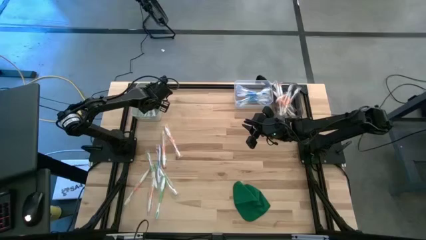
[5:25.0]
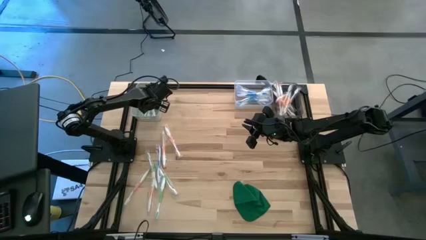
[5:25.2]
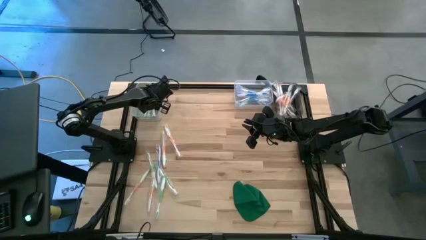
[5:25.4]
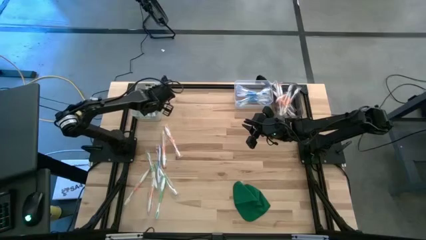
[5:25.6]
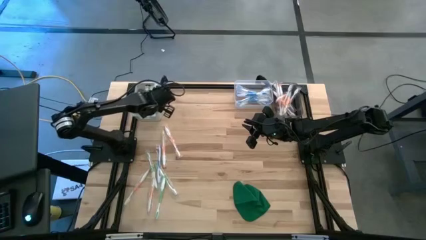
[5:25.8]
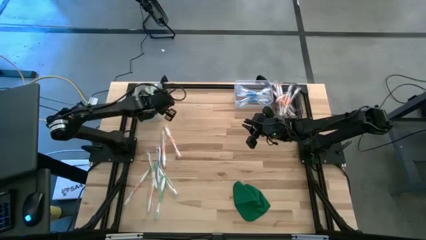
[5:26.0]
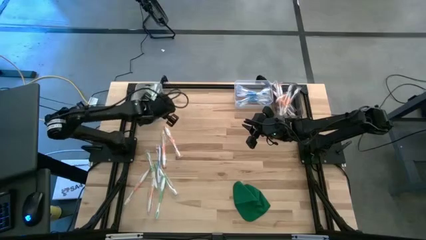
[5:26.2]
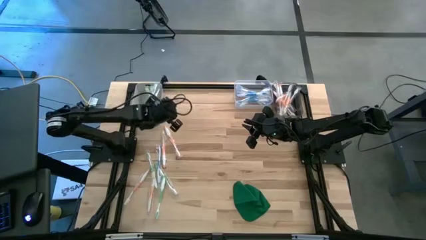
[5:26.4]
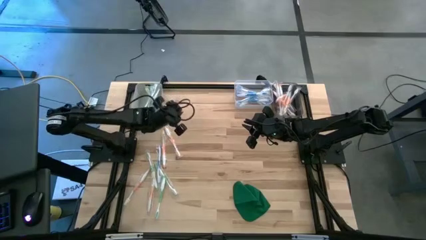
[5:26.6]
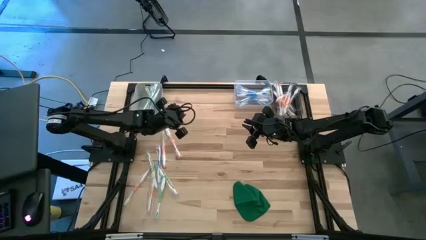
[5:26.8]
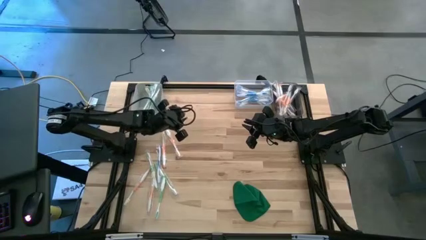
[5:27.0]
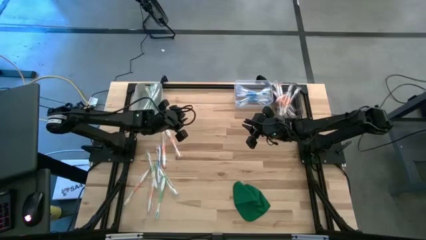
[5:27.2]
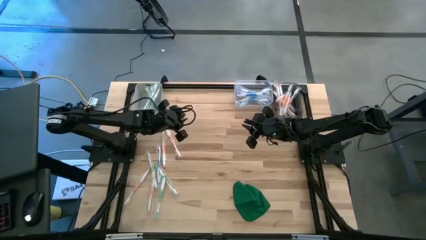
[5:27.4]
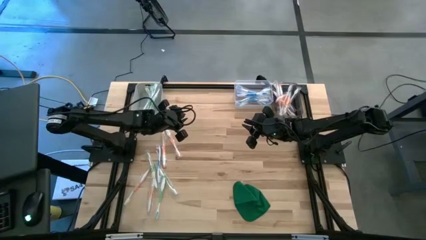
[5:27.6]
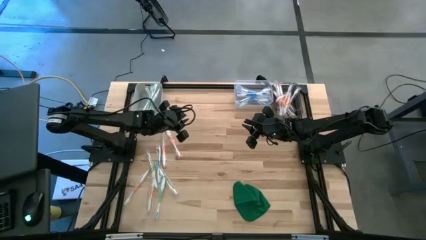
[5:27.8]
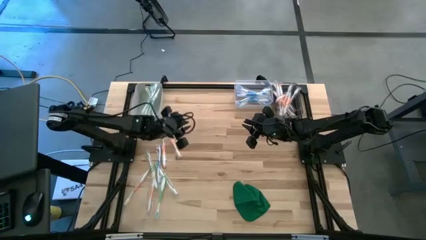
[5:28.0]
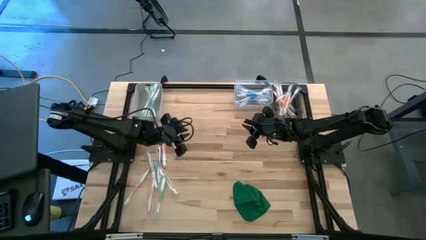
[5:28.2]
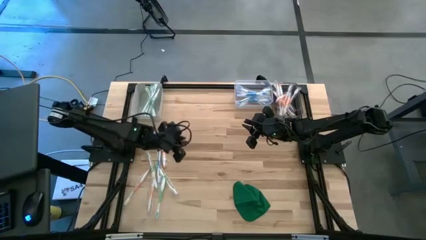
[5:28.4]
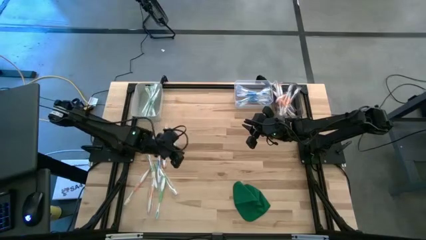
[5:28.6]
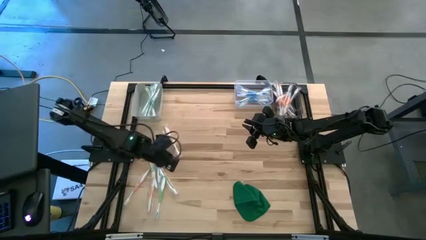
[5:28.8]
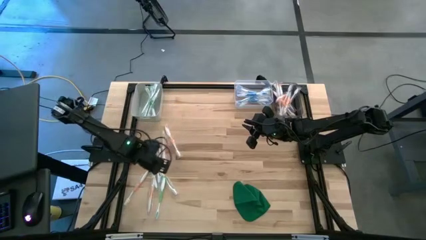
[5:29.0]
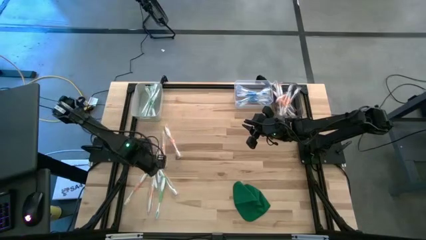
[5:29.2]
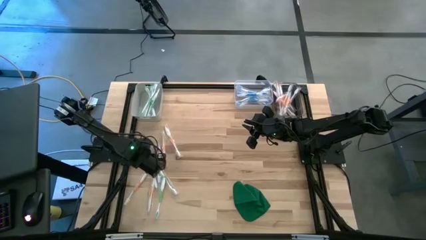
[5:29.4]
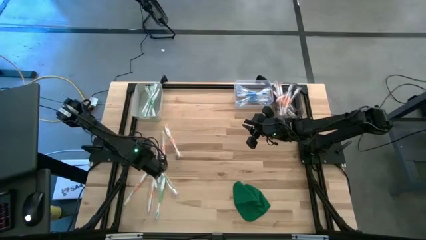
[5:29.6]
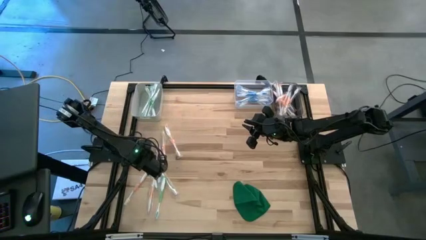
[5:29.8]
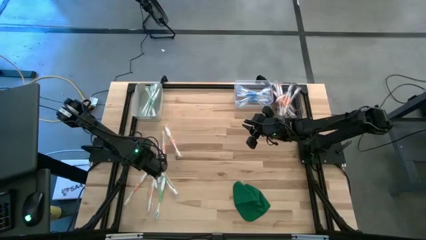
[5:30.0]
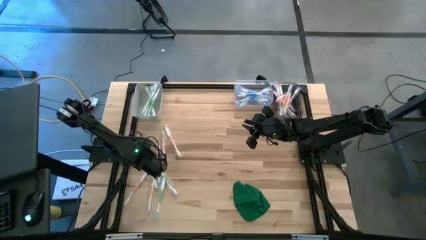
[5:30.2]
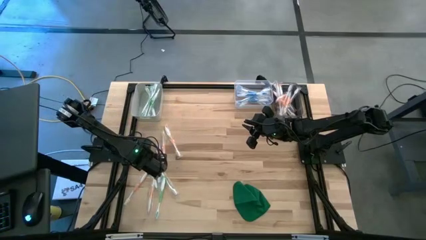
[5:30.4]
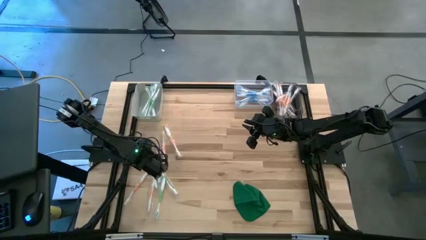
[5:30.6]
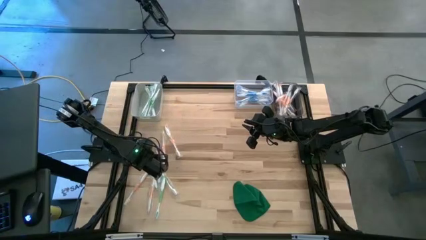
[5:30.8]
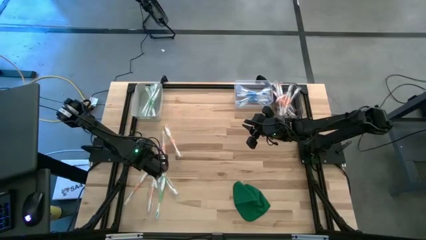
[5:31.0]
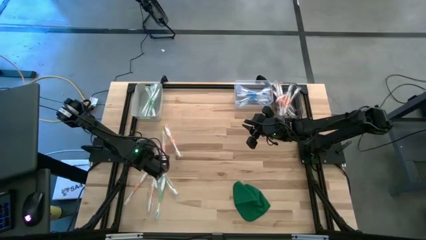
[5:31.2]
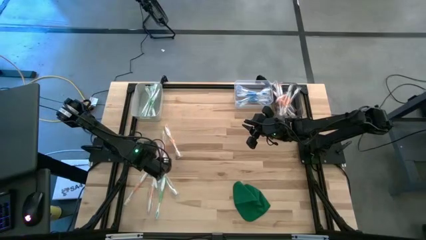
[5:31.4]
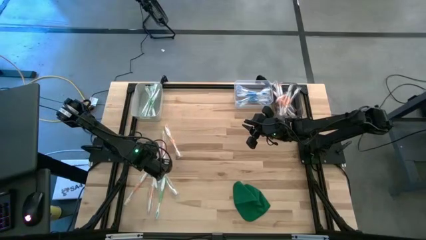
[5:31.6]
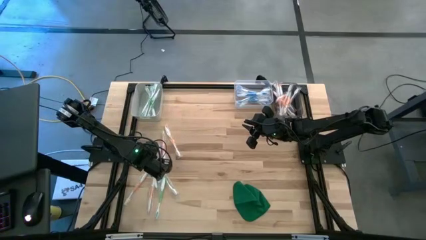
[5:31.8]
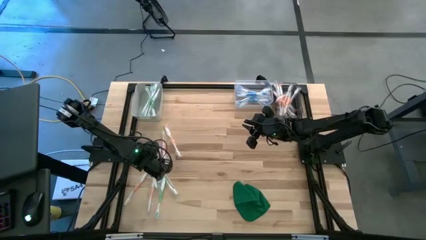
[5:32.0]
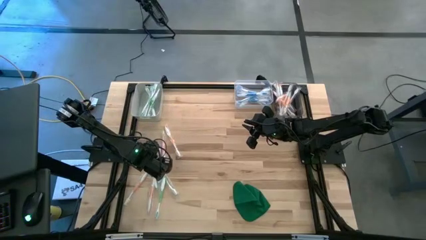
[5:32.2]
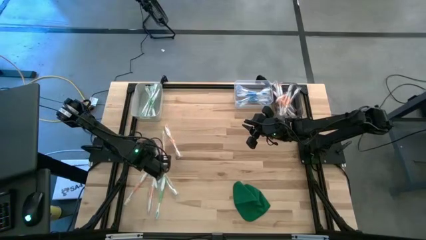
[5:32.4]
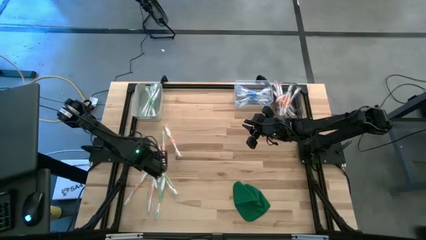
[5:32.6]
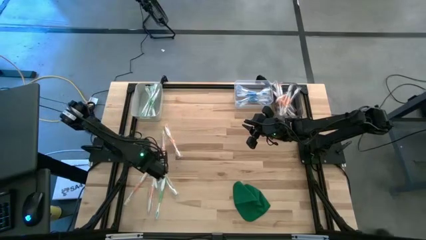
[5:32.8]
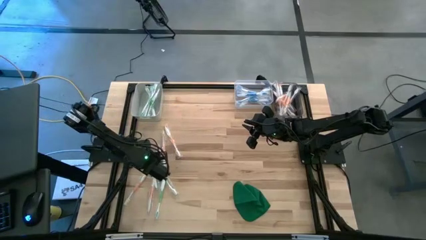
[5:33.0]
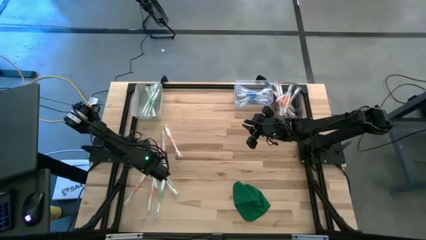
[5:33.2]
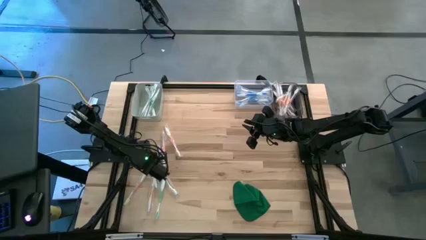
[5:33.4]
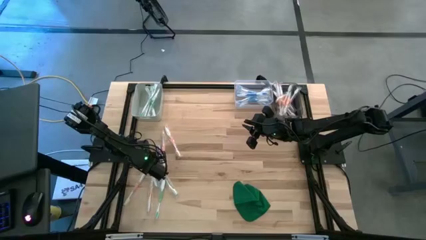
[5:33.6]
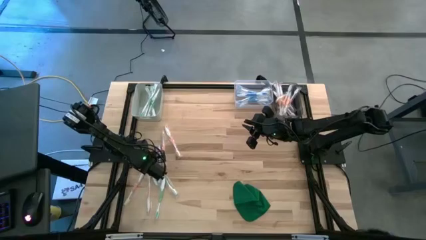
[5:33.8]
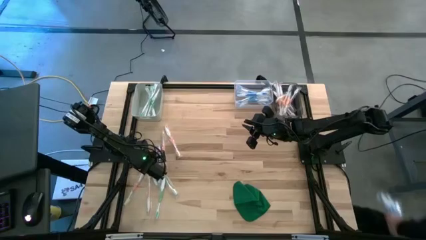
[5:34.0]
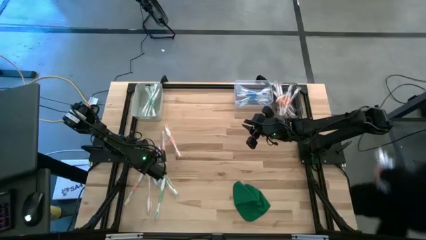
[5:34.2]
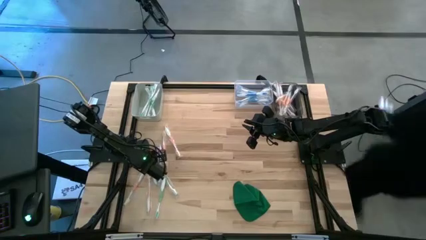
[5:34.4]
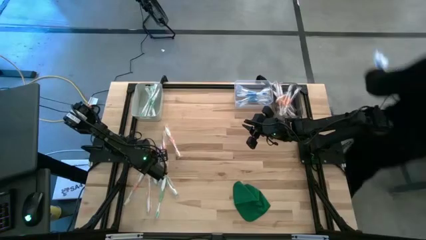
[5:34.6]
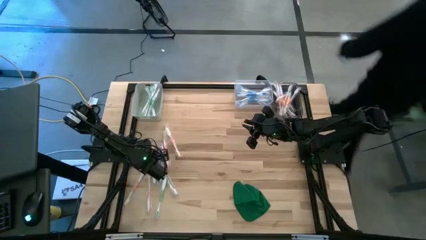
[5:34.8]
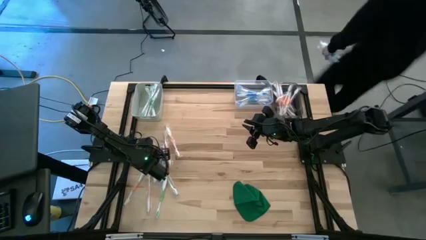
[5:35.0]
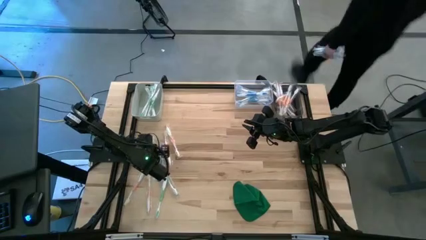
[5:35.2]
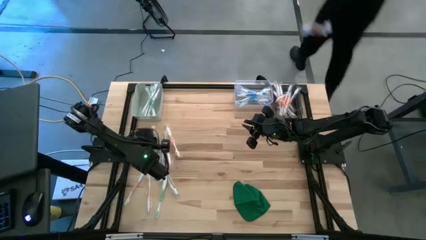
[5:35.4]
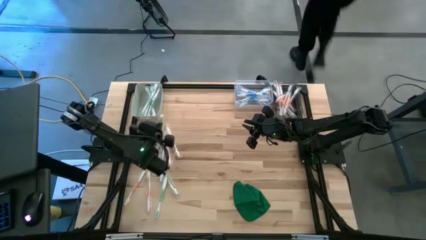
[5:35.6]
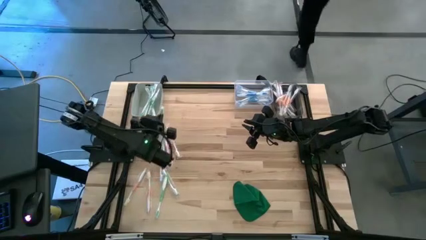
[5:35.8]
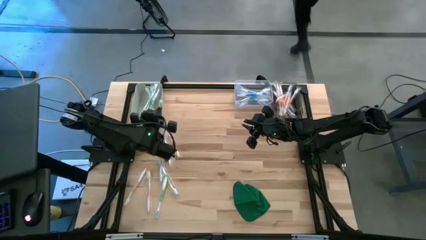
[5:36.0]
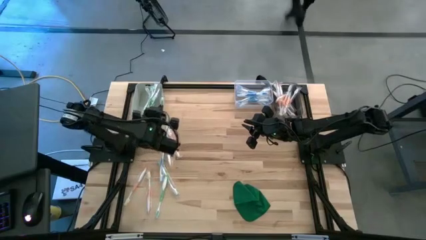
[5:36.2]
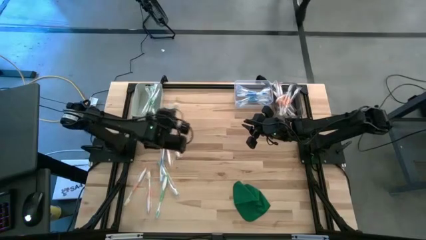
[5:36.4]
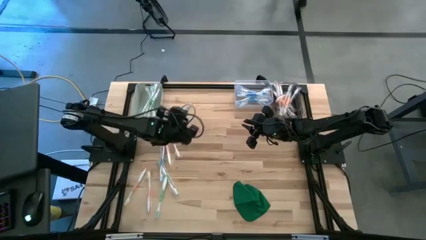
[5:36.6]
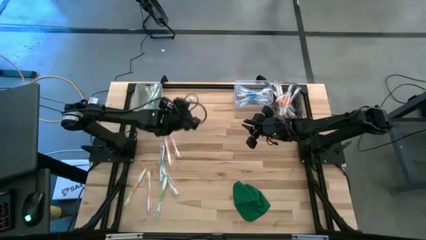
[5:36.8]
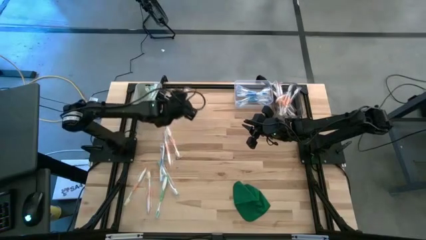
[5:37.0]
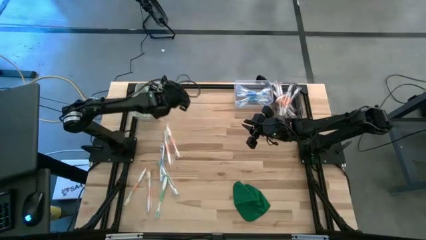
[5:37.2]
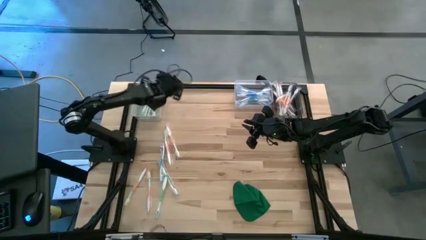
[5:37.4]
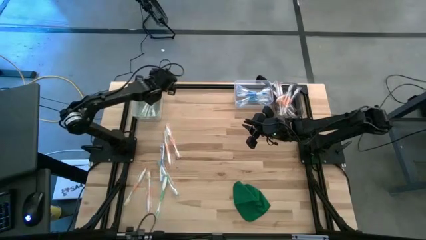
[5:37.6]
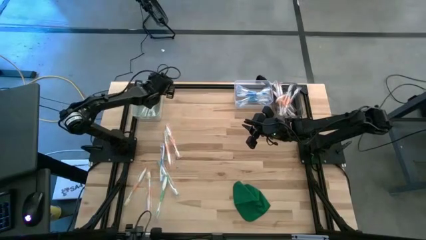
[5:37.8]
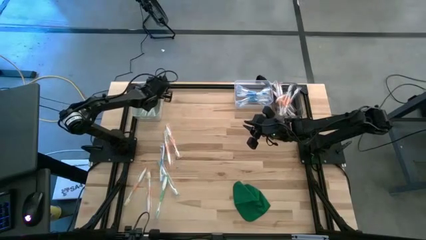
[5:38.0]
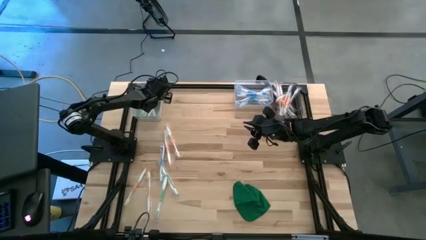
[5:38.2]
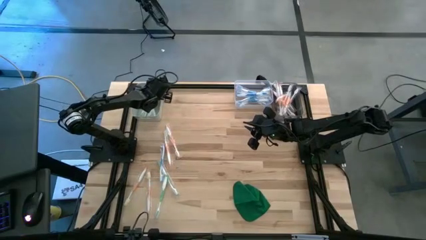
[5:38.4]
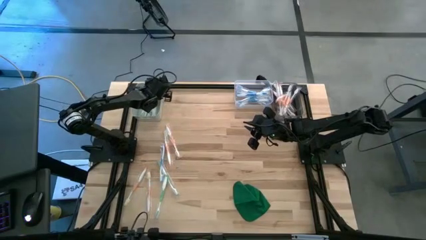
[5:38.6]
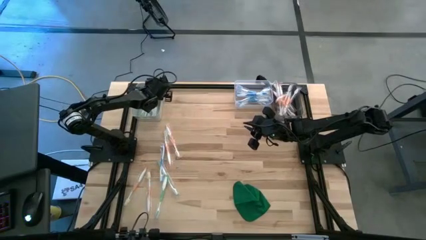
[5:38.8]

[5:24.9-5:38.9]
Task: Pick & Place Toothbrushes
Put the green toothbrush into the gray bin
